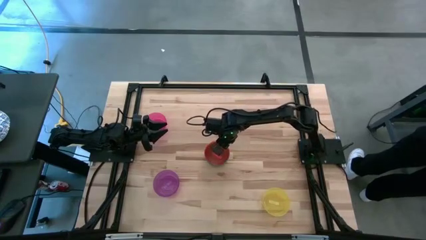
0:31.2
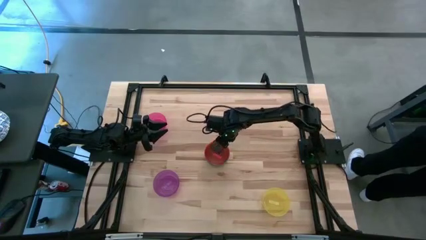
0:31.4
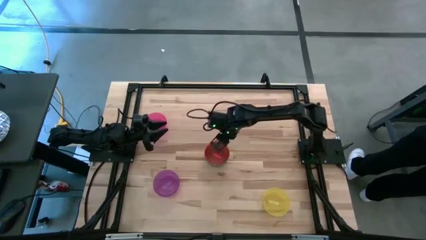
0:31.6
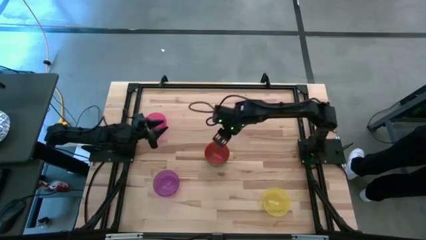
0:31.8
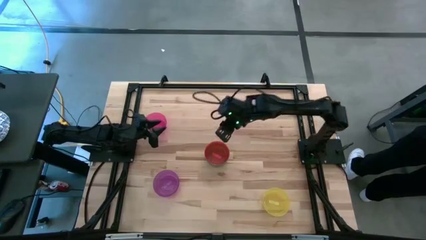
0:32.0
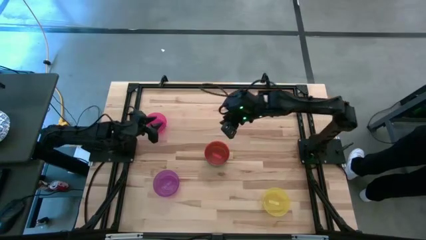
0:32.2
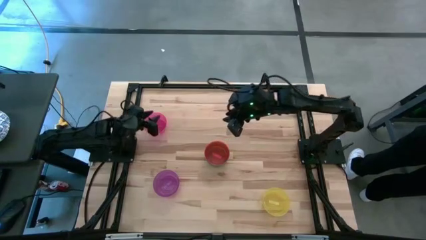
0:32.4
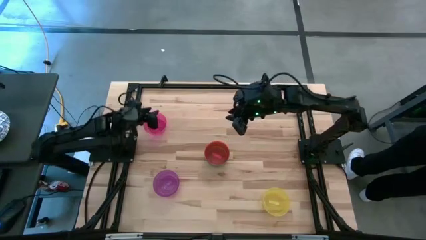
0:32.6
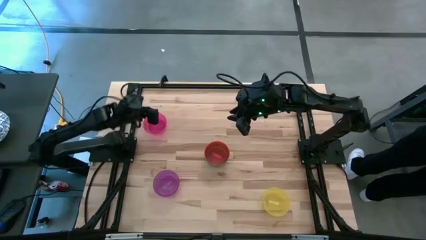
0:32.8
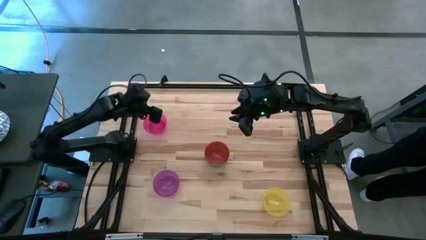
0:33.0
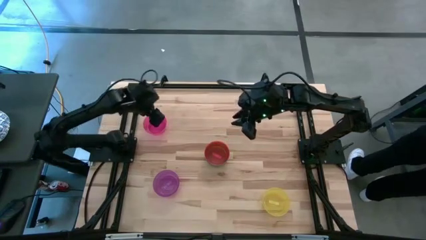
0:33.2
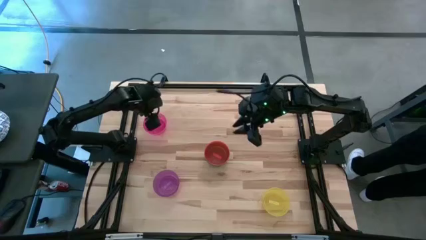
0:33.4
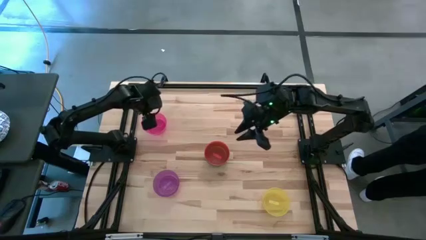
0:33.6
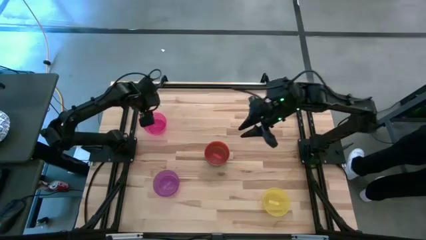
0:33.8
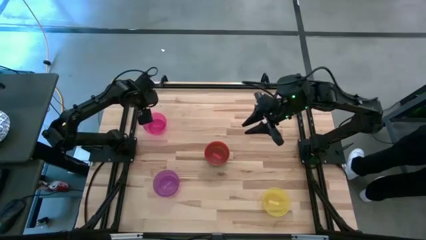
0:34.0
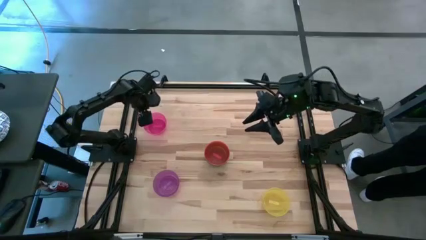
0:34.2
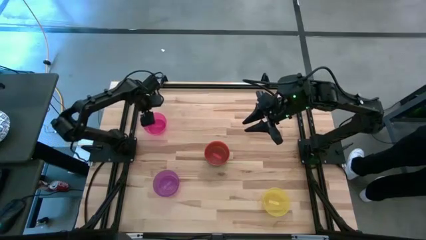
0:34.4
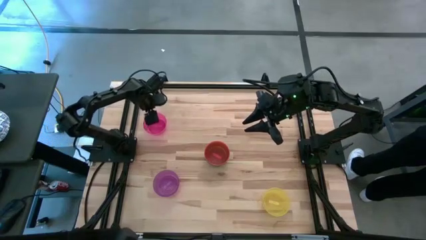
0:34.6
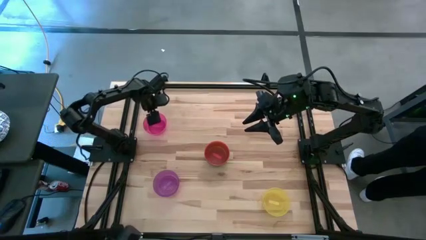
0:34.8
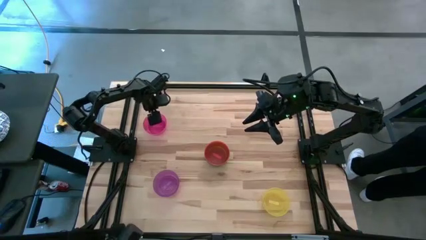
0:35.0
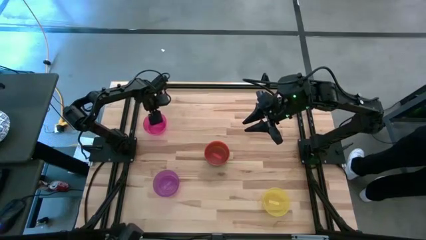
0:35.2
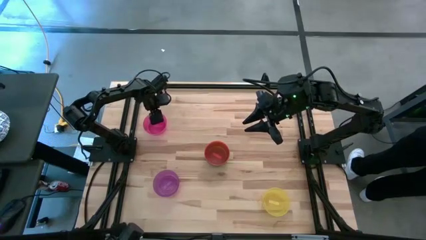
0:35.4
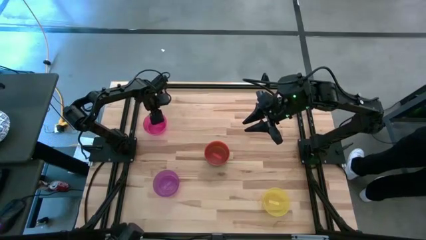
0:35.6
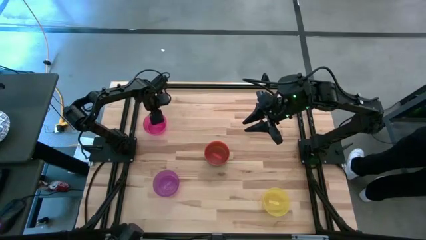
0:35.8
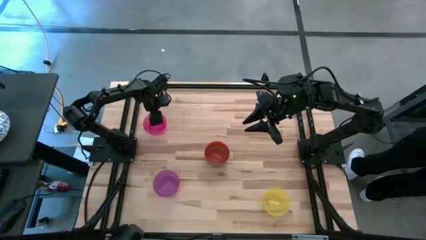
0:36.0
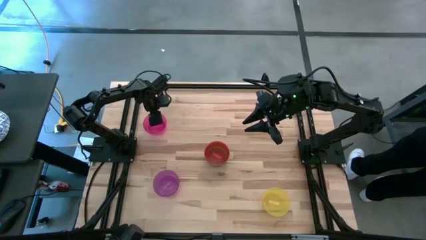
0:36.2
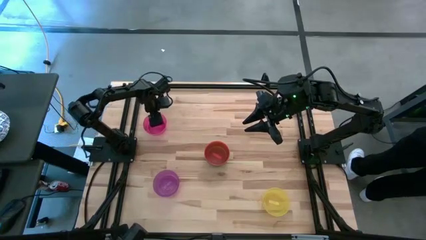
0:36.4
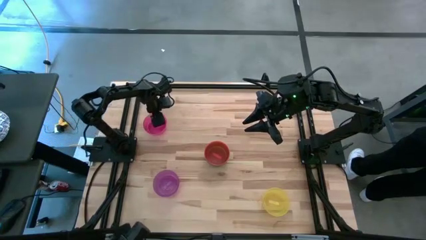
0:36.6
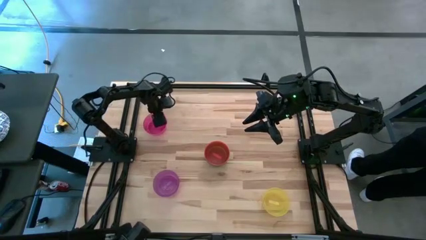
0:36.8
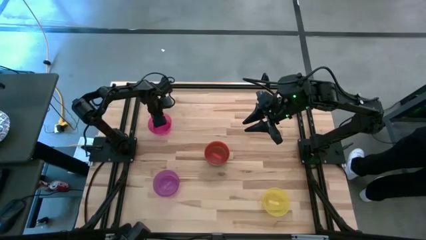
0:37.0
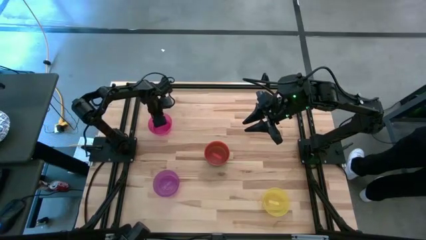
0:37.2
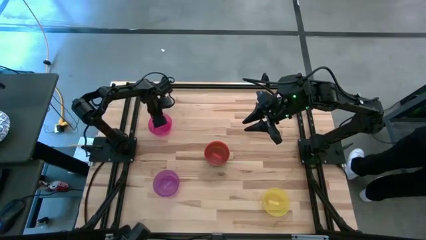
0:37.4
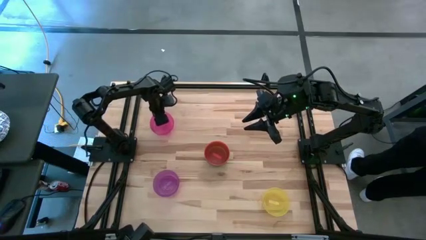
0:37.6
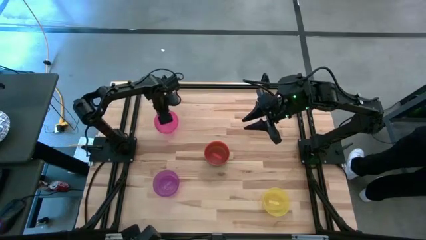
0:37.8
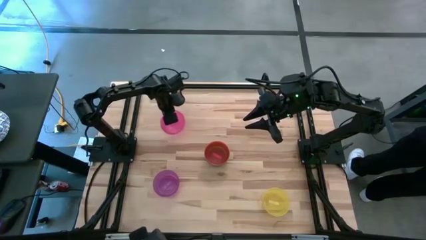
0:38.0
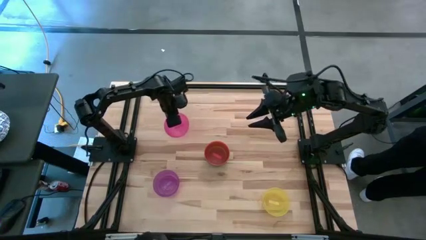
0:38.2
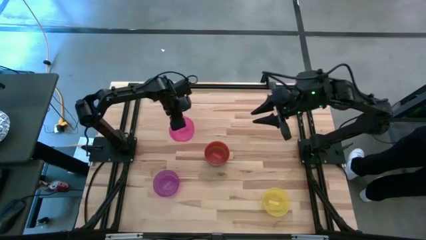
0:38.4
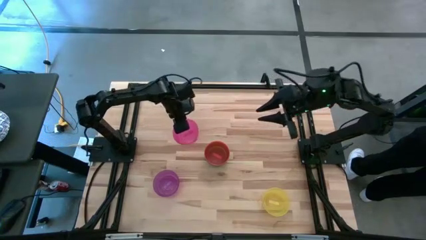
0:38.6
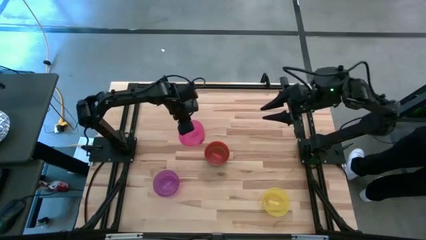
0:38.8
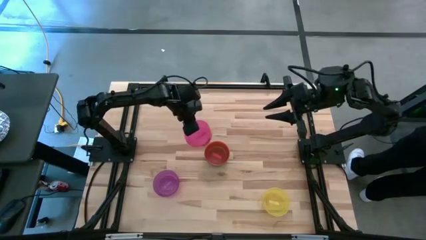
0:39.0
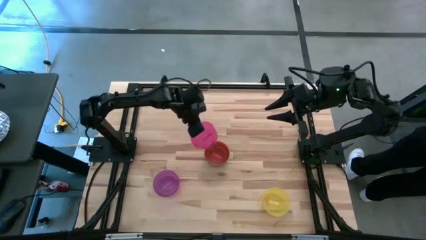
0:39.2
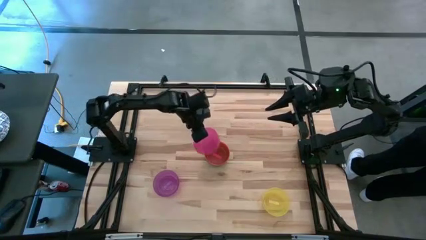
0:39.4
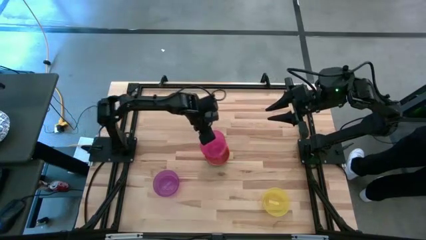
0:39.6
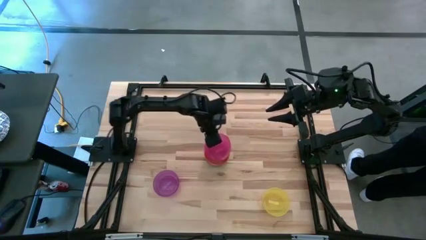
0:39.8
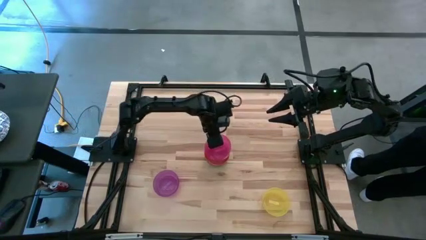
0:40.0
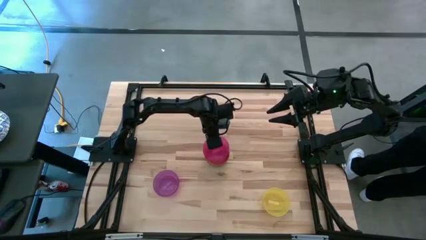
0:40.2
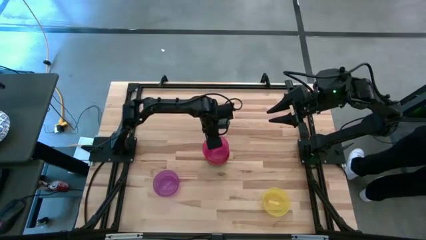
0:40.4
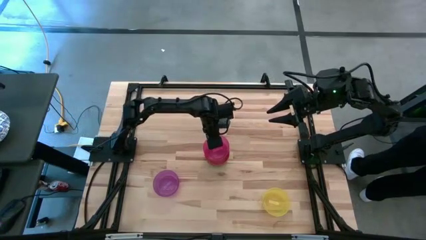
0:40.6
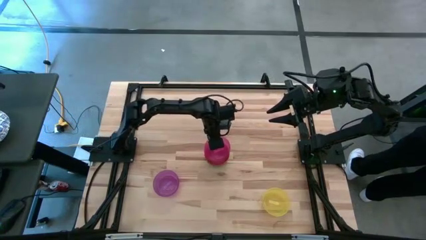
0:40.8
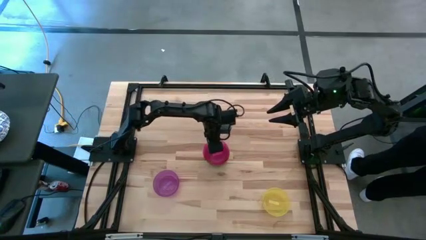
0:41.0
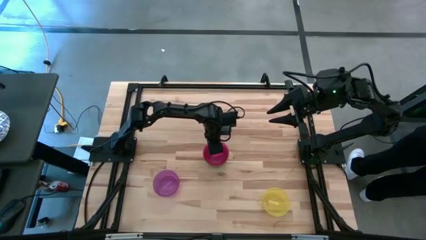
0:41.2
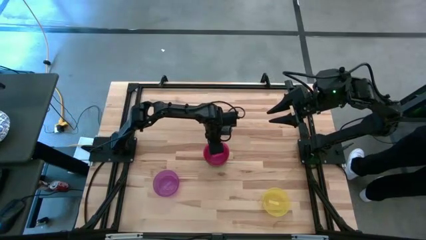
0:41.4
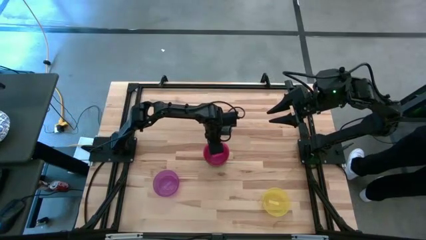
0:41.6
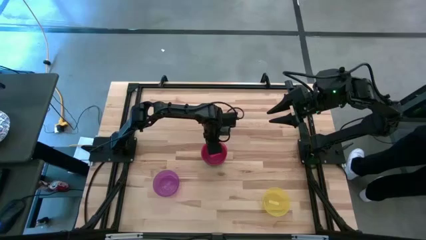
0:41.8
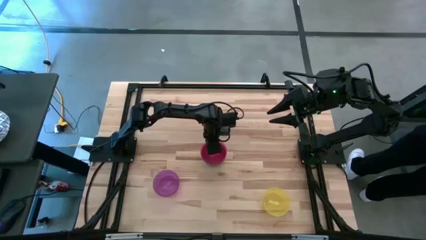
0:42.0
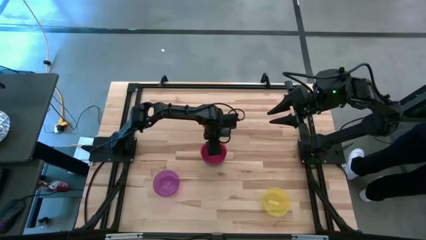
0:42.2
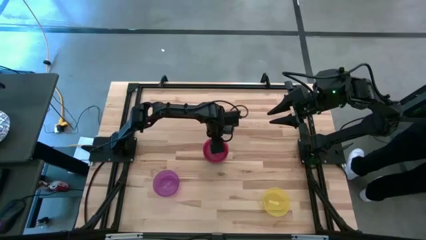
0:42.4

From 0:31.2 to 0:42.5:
Task: Nest bowls inside each other
Stack the pink bowl on the orange bowl

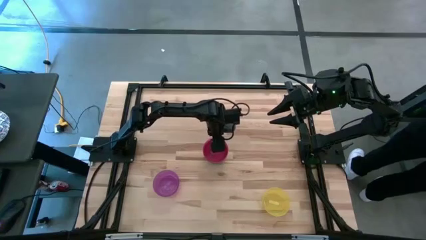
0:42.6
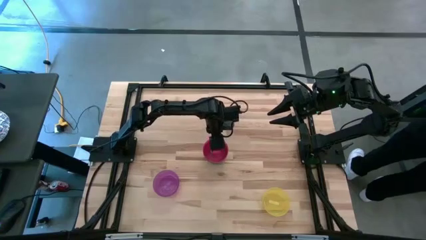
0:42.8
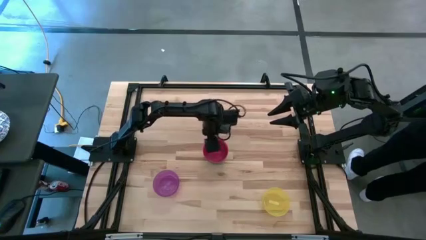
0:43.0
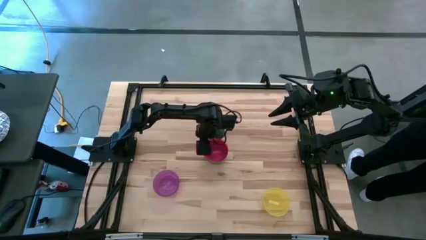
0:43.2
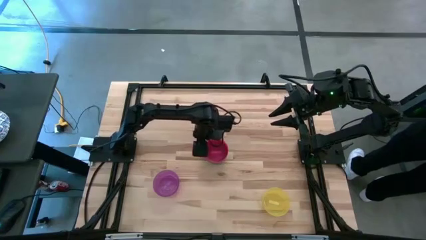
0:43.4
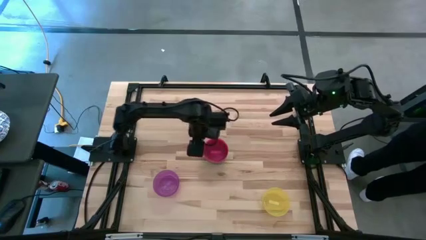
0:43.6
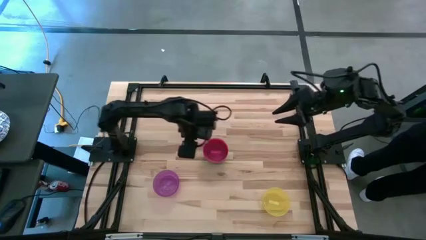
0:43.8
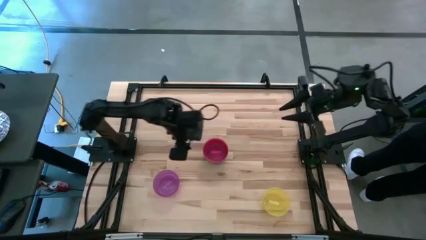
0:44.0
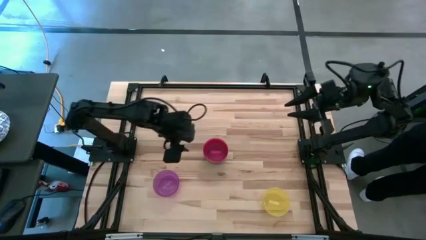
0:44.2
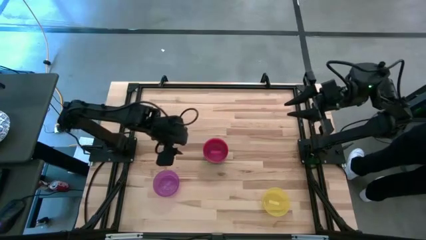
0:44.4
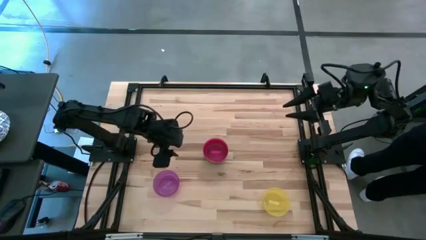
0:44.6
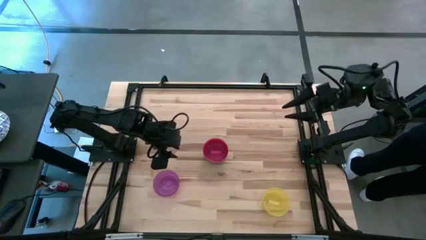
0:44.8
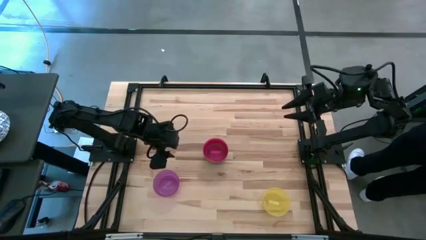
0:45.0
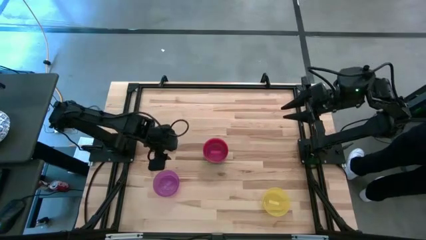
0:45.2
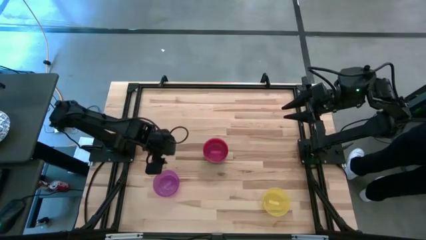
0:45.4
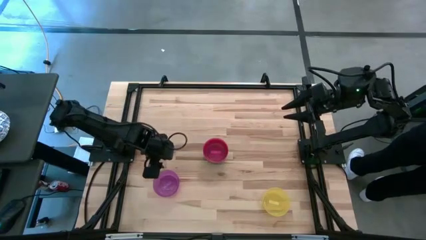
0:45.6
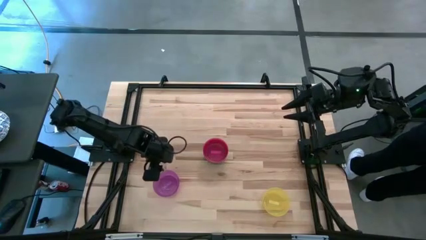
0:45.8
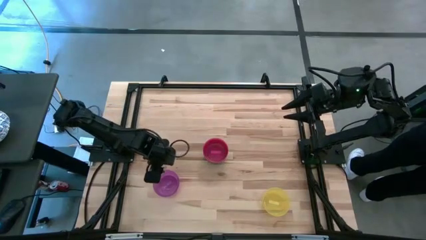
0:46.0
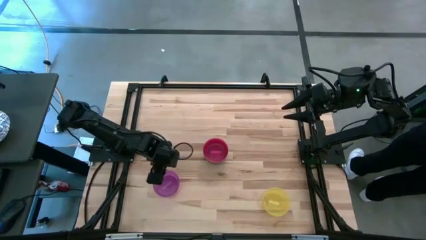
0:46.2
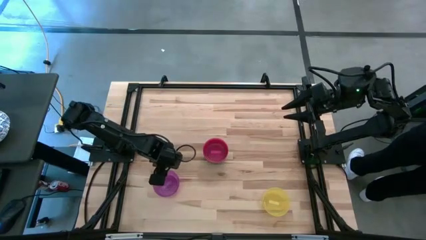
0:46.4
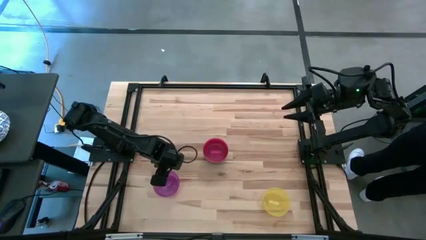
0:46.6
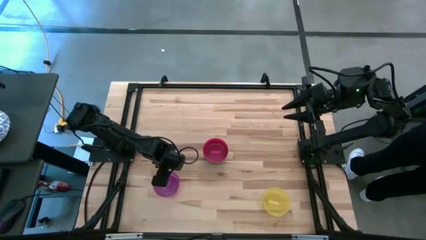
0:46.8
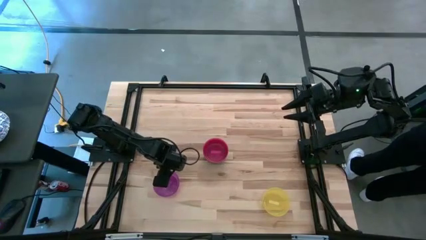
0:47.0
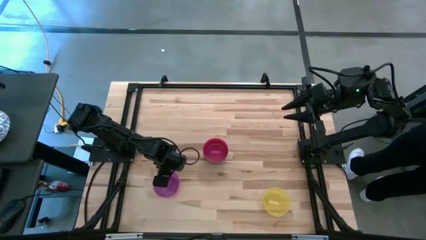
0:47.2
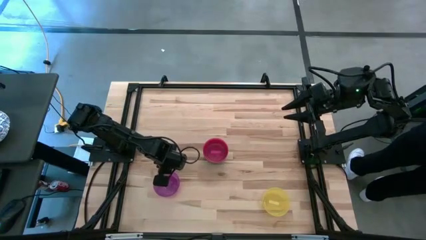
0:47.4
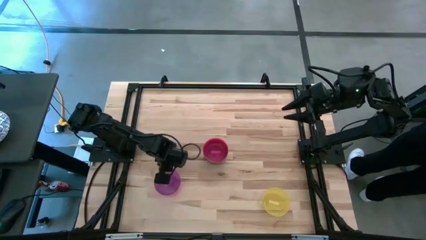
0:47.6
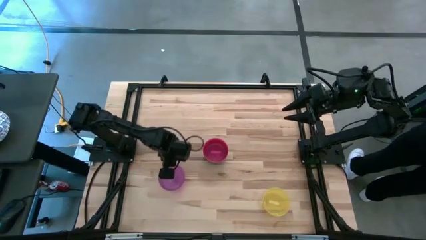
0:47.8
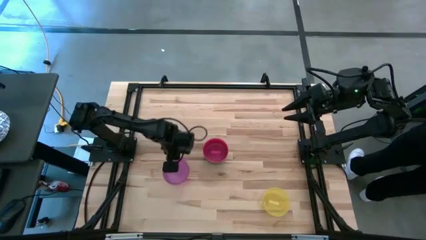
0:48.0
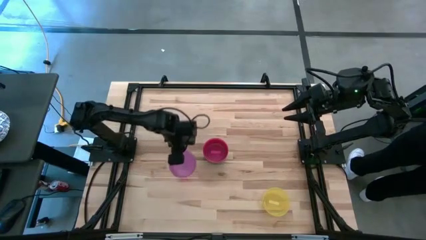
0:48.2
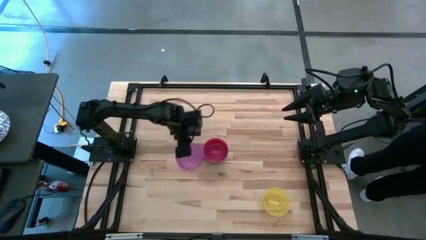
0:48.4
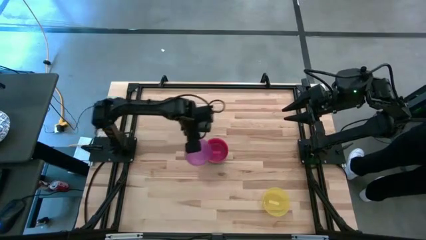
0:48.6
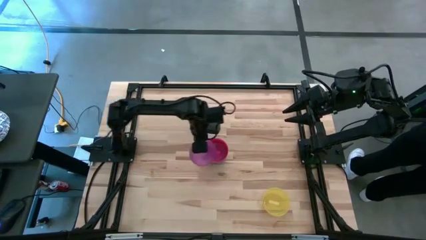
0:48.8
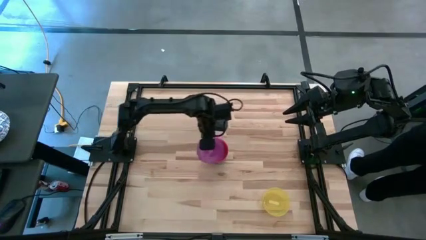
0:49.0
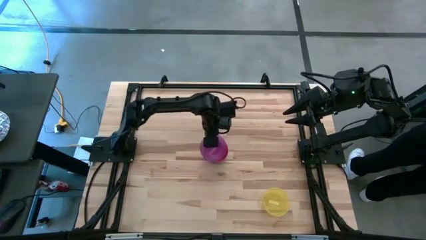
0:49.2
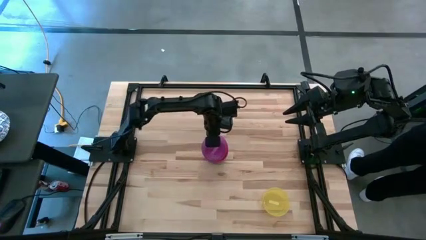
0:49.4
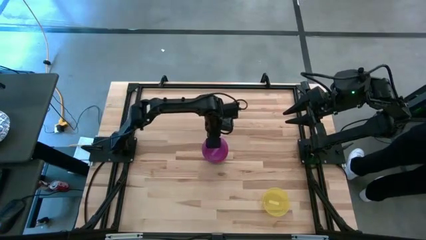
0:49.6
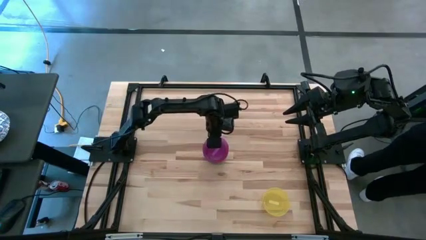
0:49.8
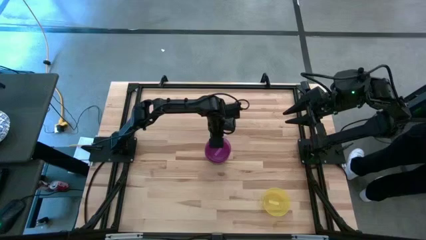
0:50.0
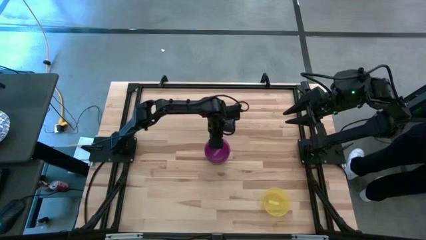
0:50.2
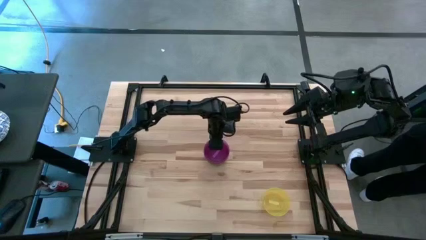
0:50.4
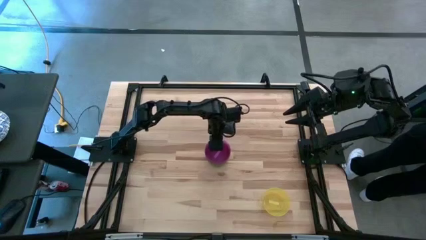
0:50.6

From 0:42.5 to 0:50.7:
Stack the purple bowl on the pink bowl
